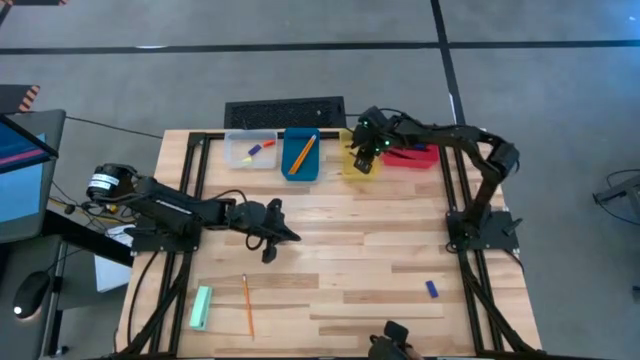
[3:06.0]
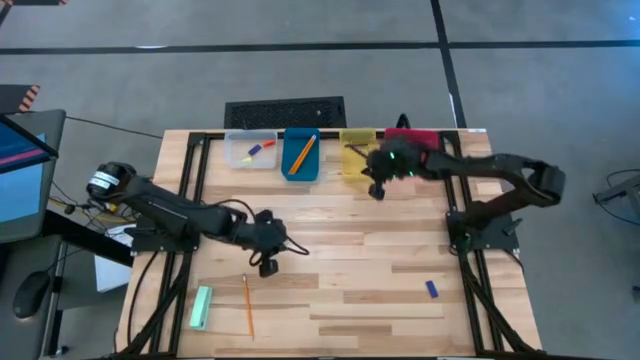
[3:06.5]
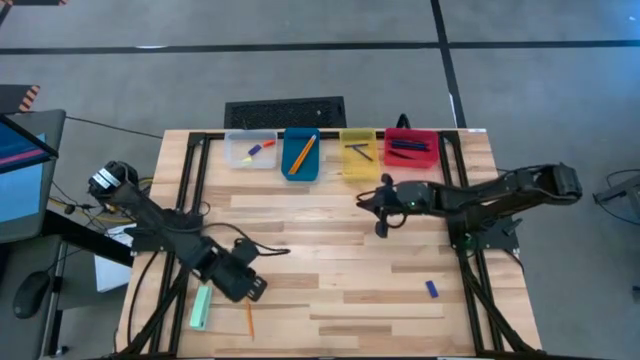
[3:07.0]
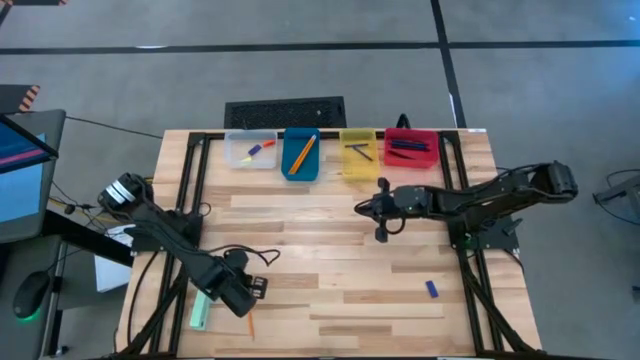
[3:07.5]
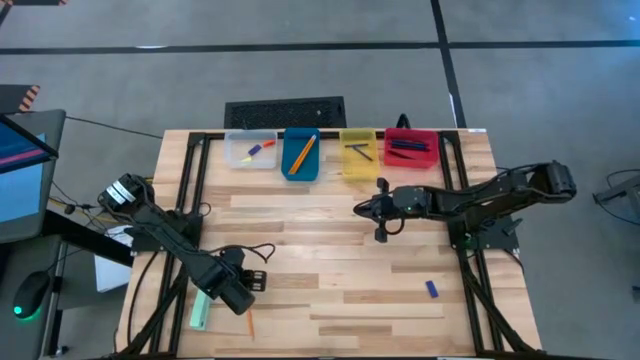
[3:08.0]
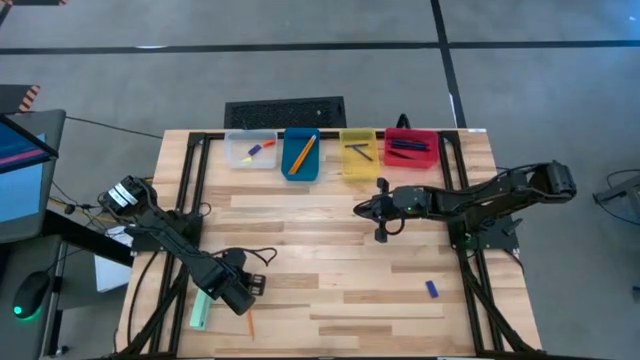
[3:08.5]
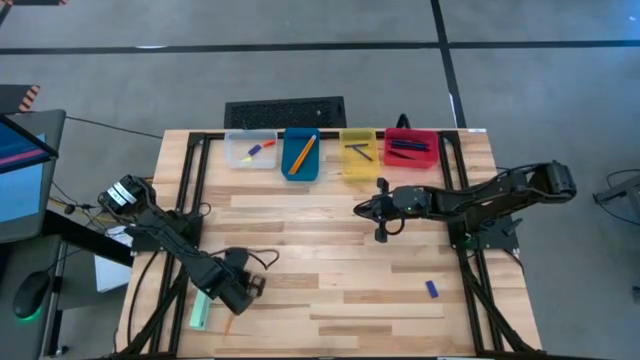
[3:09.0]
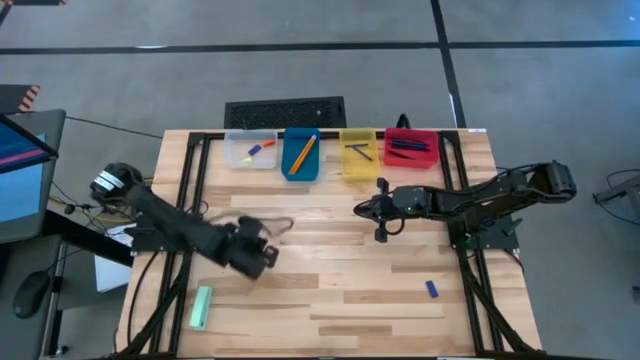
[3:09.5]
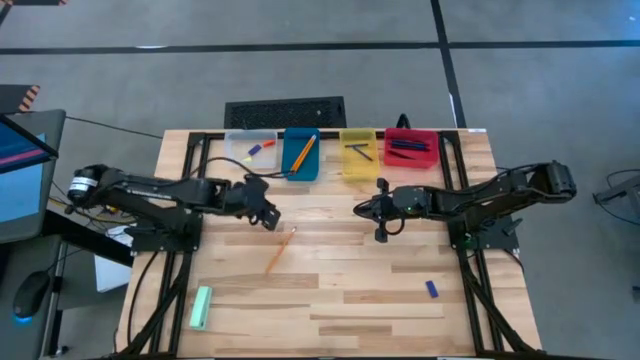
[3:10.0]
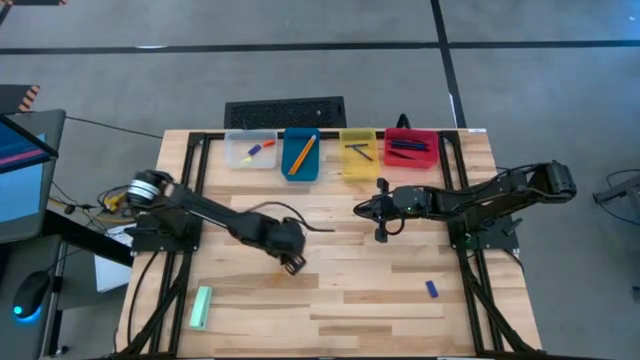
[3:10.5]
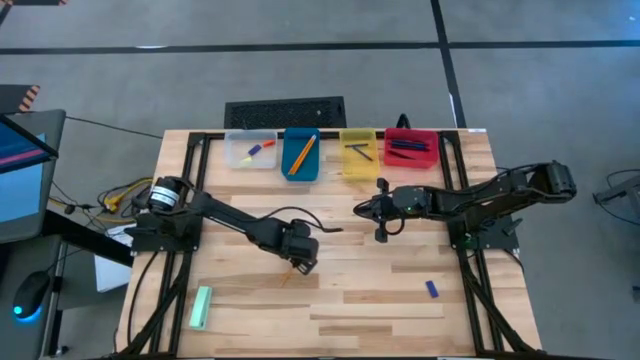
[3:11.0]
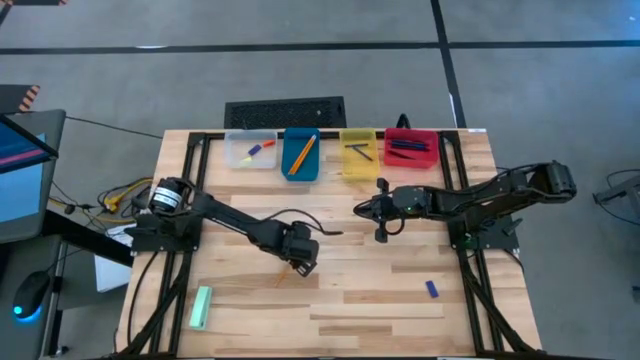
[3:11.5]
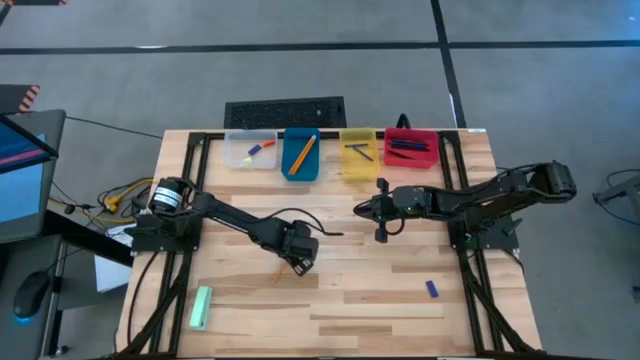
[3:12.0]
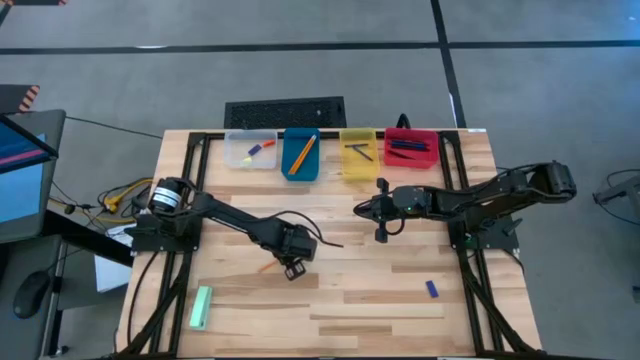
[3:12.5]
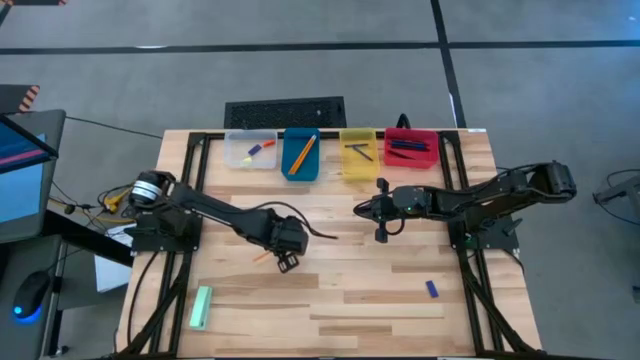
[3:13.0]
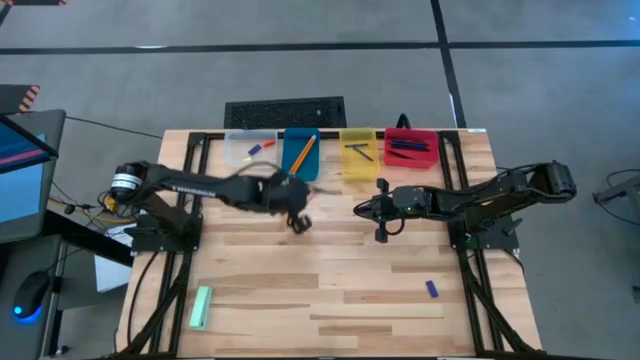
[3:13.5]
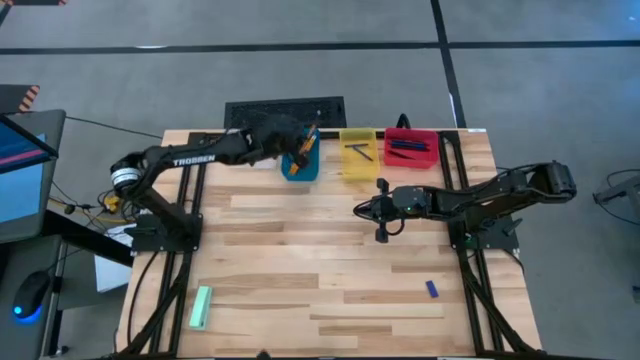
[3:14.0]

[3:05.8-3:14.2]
Task: Sort crayons/erasers/pens/pencils in bins
Put the orange pencil into the blue bin

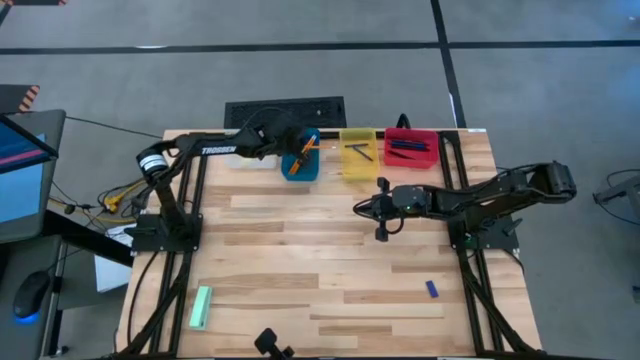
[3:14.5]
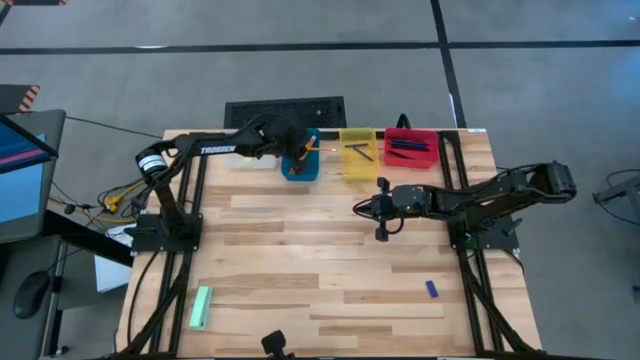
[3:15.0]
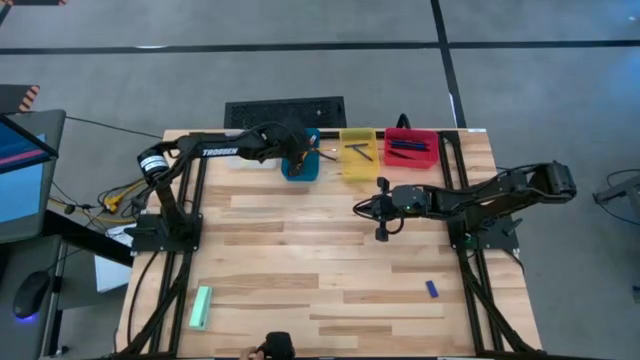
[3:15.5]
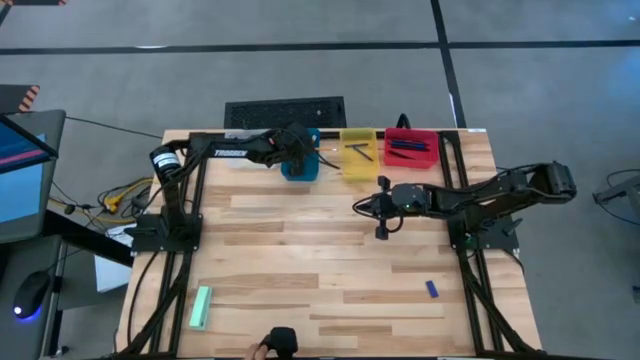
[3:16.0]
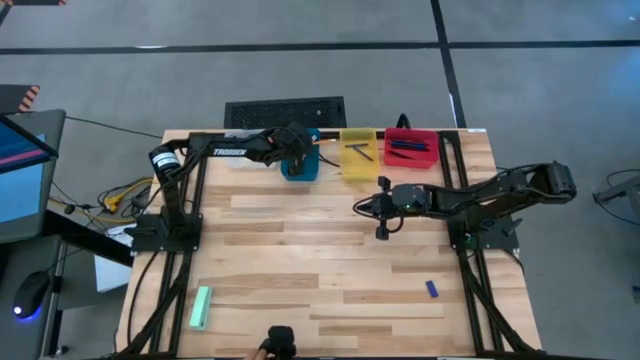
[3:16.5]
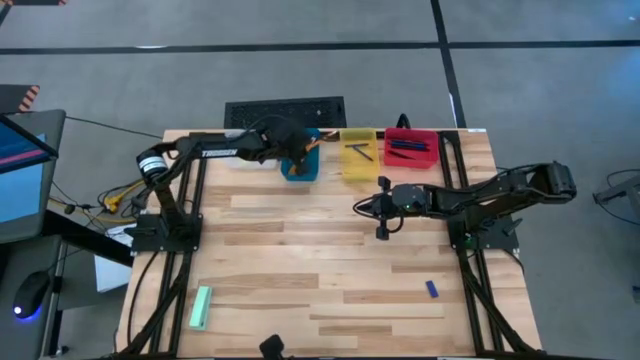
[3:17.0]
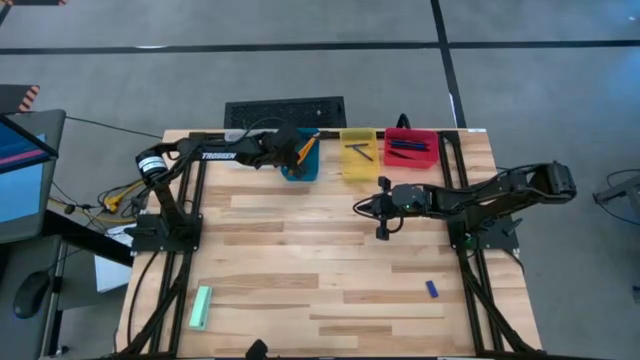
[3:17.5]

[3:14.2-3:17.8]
Put the orange pencil into the blue bin

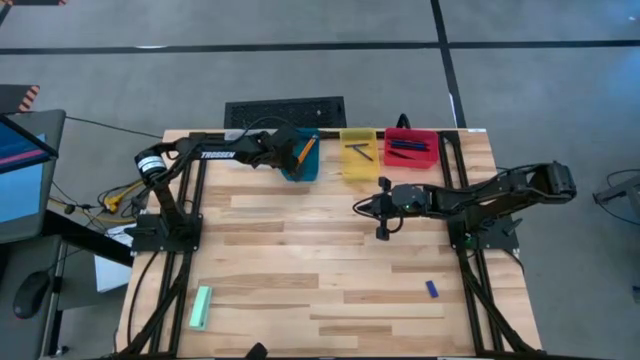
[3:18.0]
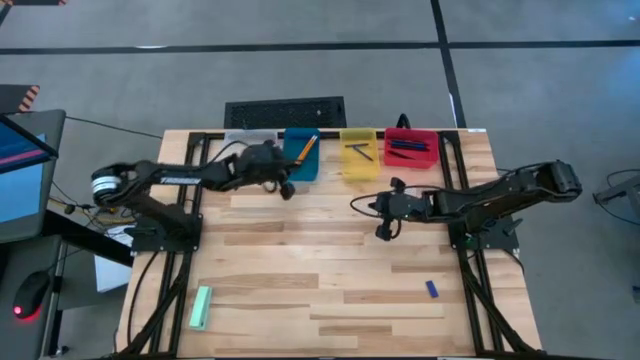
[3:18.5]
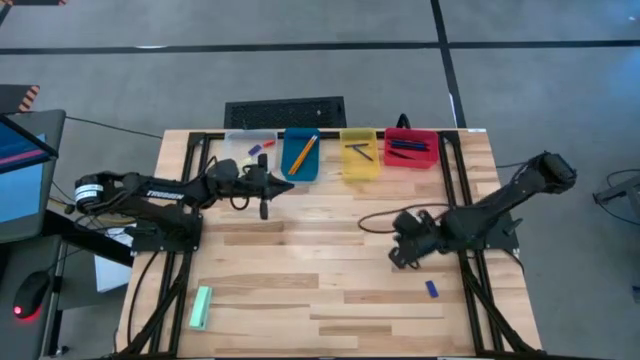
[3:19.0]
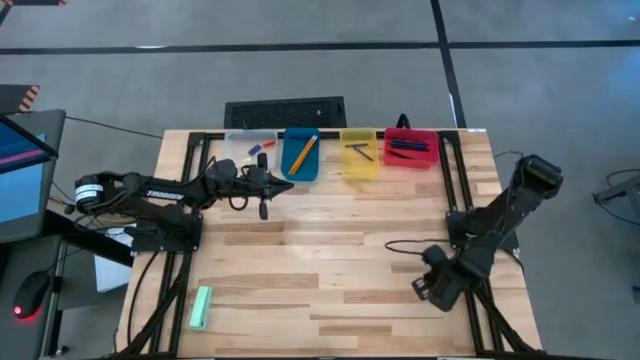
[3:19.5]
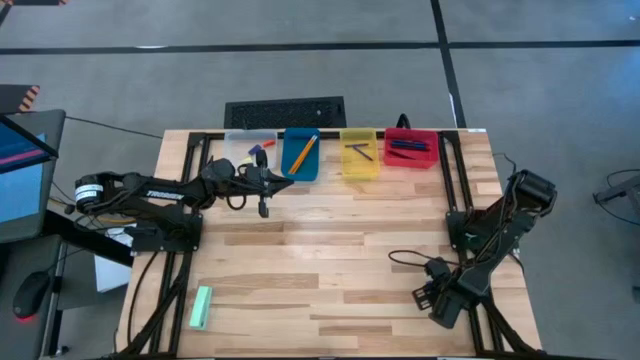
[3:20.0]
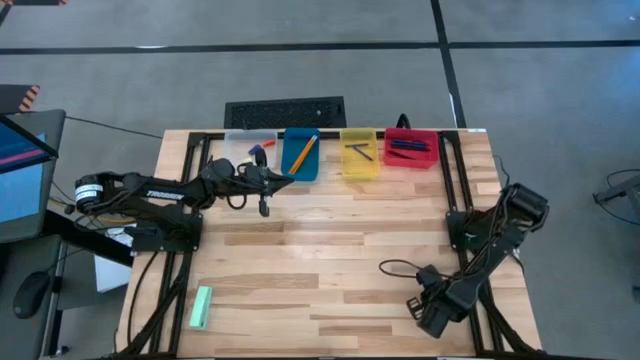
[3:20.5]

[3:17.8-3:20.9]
Put the blue eraser into the transparent bin

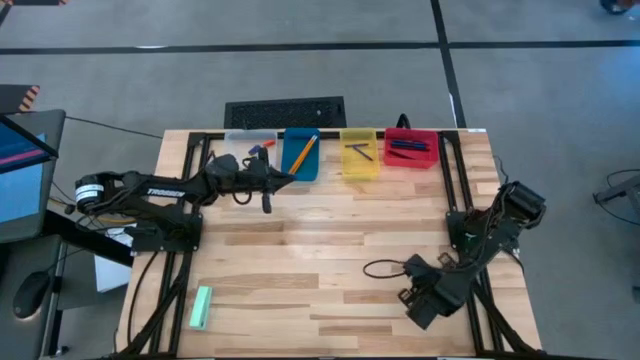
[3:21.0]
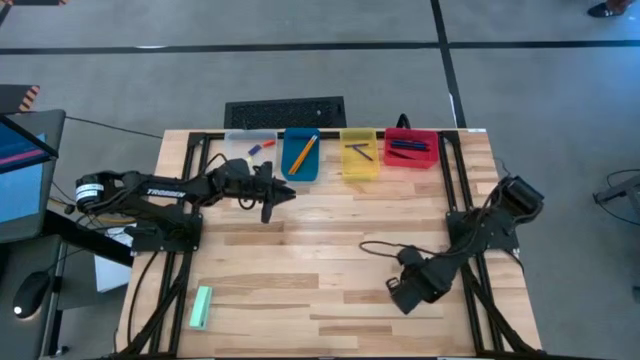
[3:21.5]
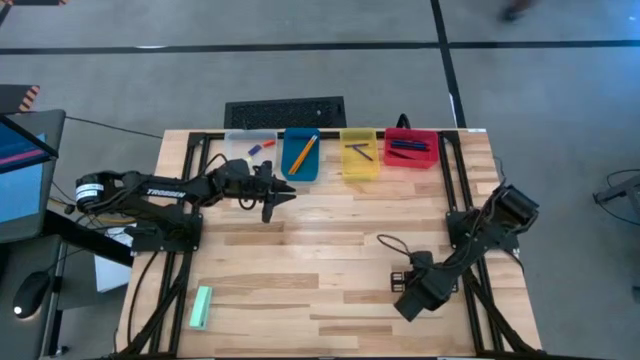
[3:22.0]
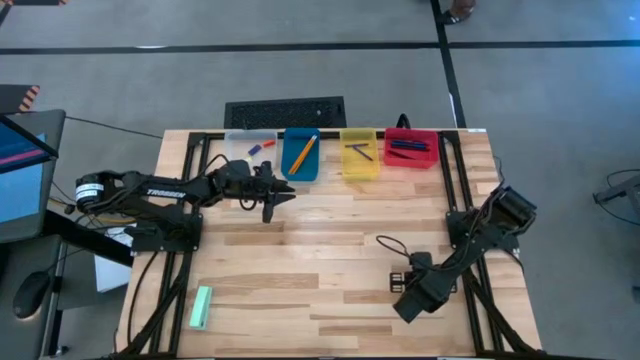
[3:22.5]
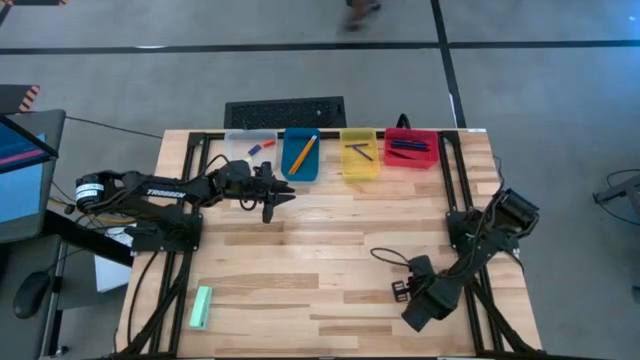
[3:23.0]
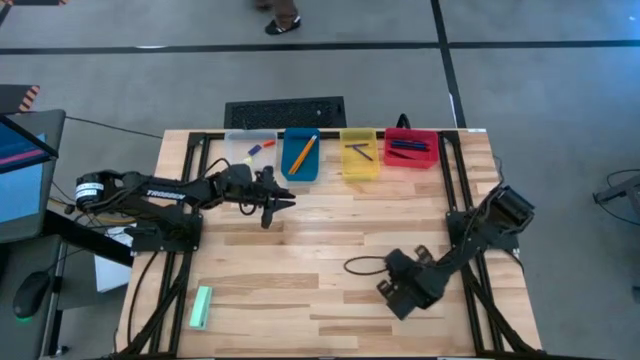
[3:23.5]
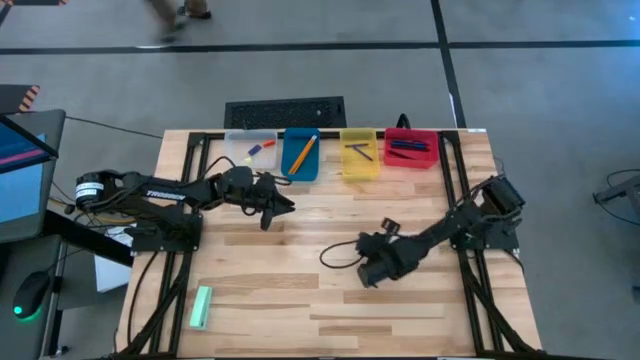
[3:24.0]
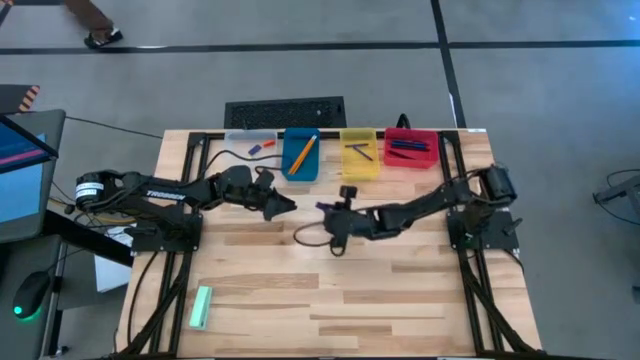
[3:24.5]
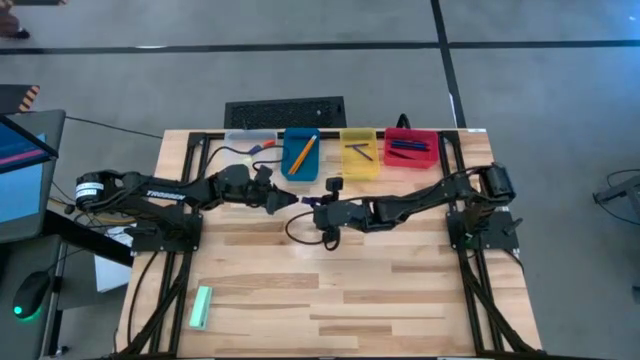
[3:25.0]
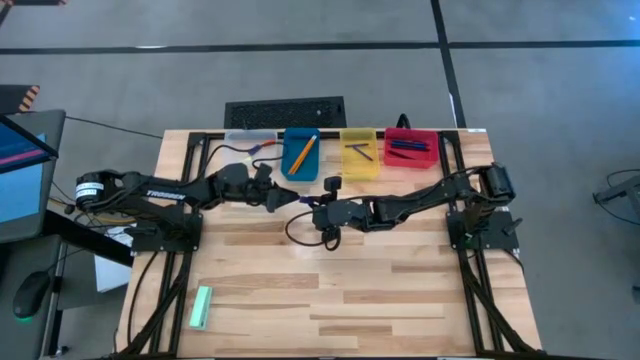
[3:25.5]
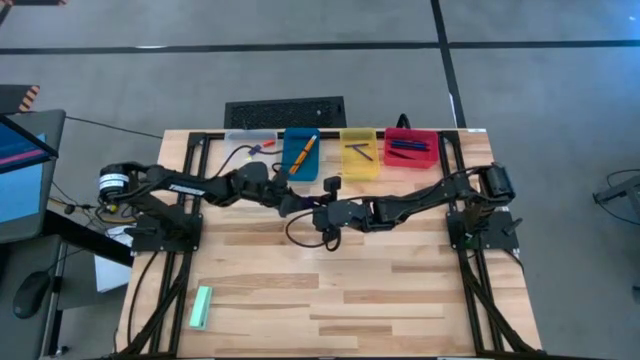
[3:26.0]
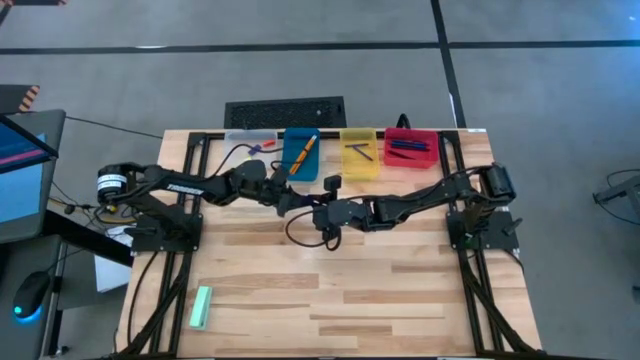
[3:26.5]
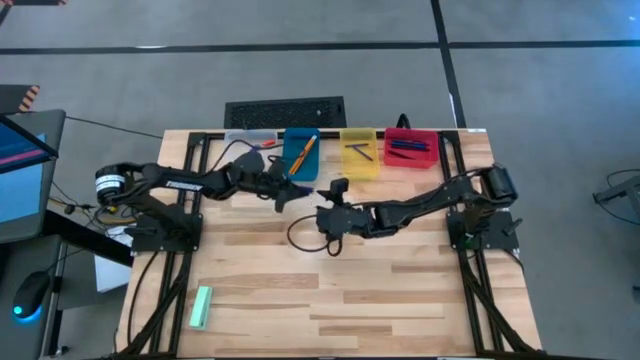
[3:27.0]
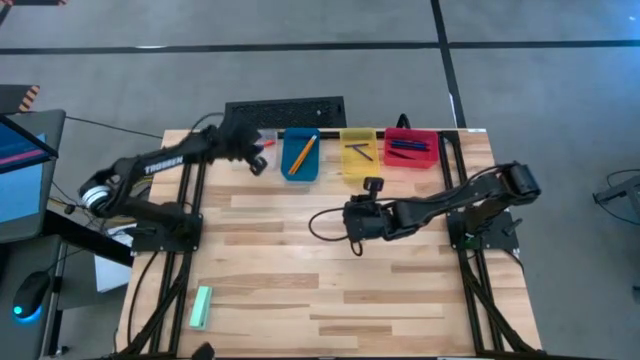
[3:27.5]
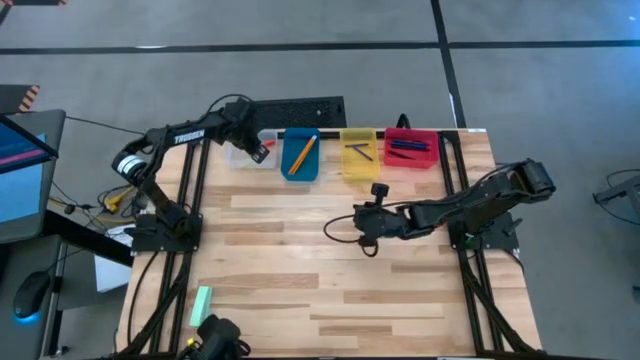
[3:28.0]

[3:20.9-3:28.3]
Put the blue eraser into the transparent bin
